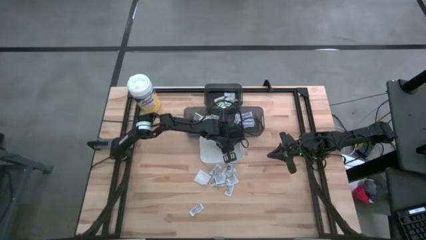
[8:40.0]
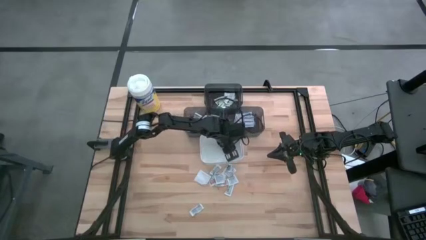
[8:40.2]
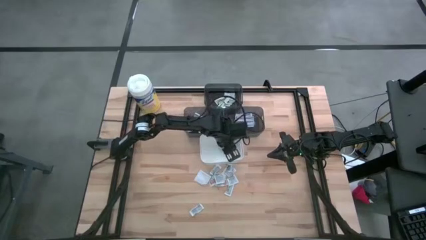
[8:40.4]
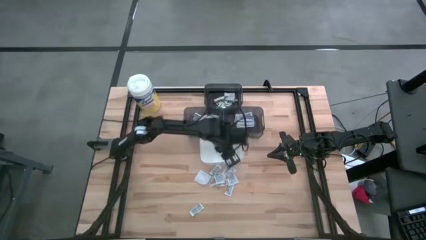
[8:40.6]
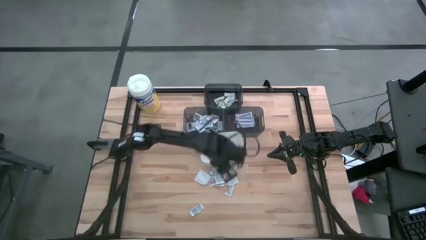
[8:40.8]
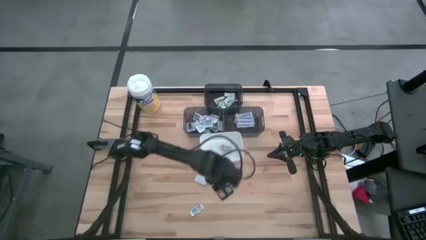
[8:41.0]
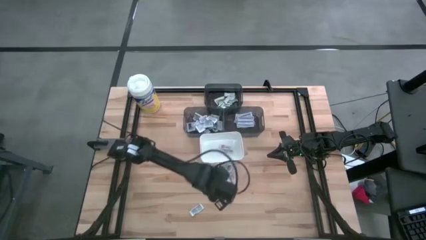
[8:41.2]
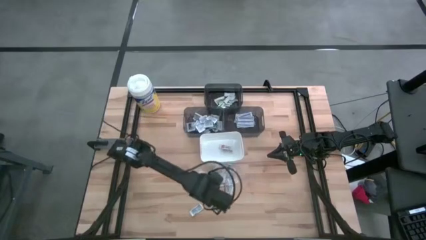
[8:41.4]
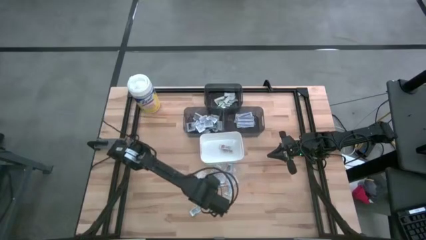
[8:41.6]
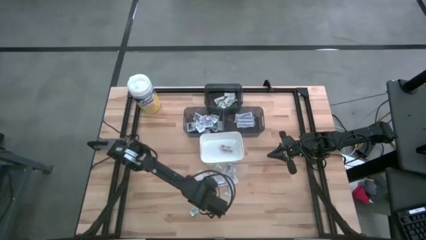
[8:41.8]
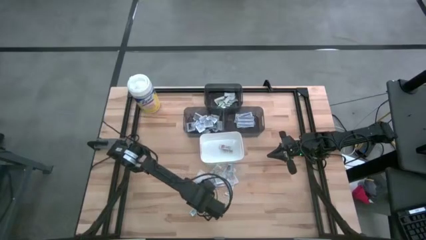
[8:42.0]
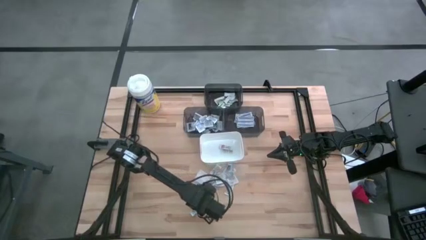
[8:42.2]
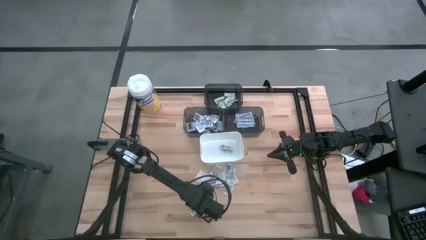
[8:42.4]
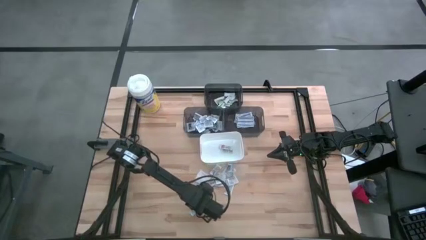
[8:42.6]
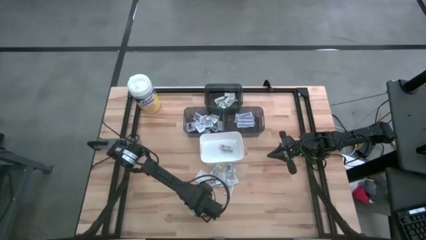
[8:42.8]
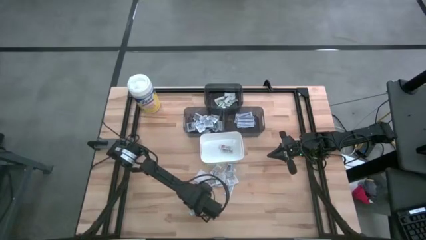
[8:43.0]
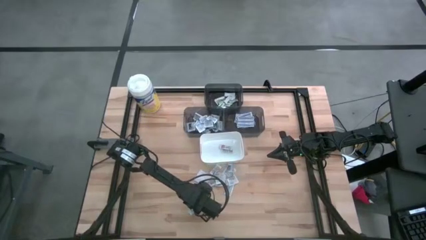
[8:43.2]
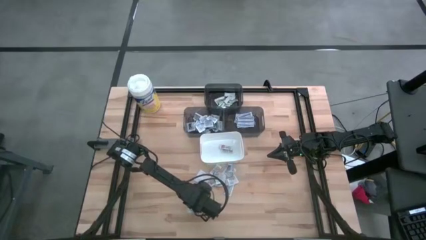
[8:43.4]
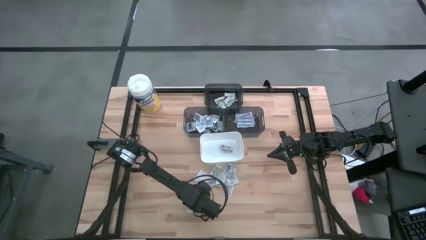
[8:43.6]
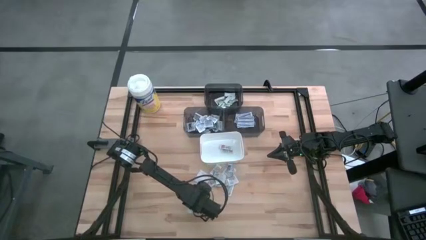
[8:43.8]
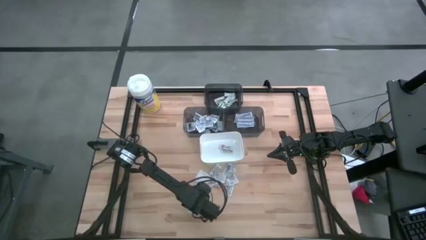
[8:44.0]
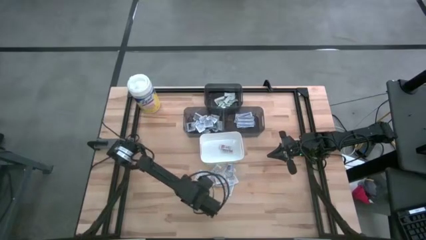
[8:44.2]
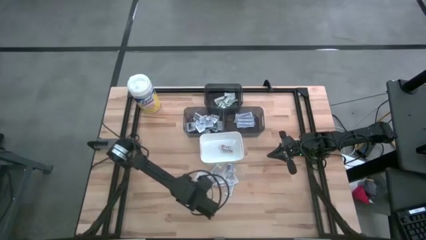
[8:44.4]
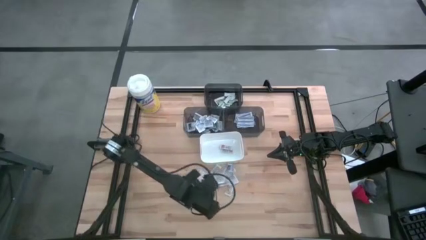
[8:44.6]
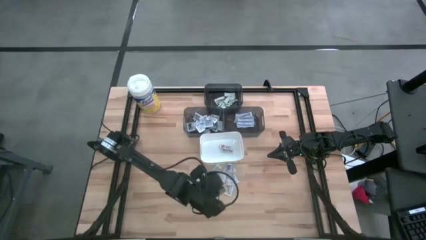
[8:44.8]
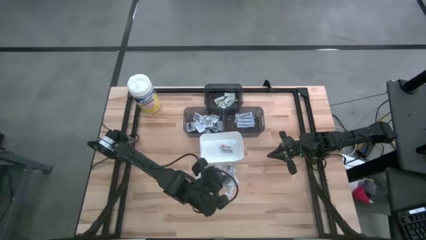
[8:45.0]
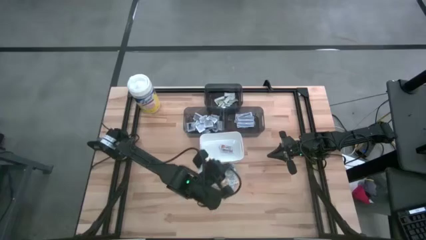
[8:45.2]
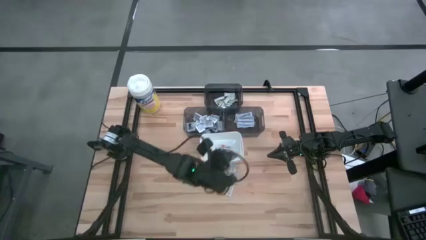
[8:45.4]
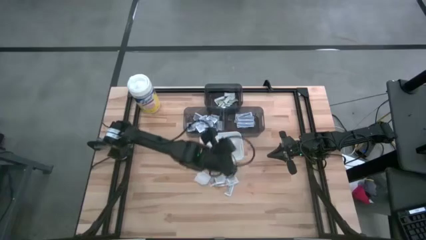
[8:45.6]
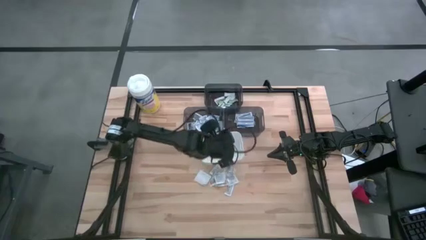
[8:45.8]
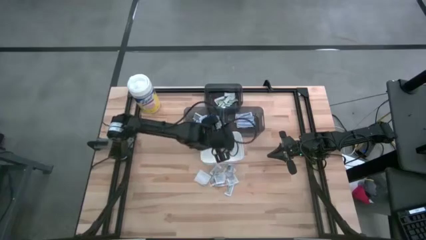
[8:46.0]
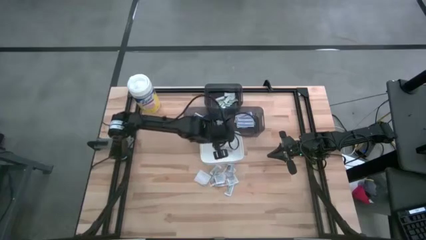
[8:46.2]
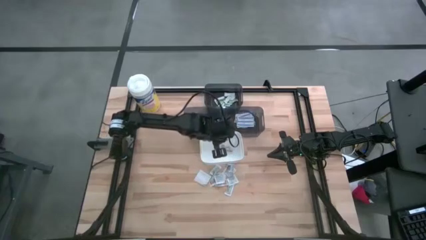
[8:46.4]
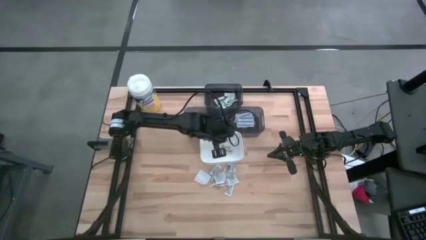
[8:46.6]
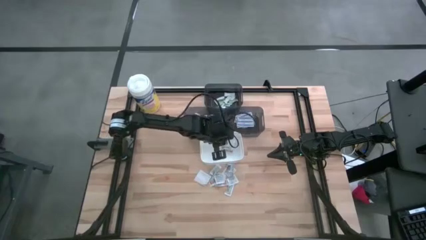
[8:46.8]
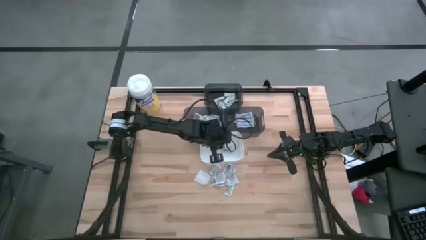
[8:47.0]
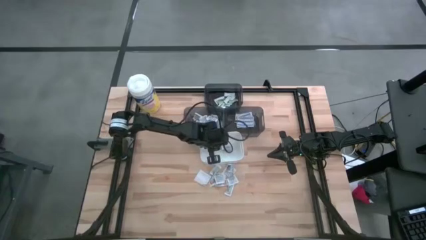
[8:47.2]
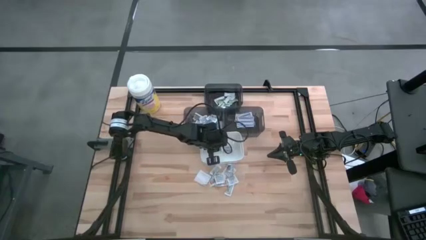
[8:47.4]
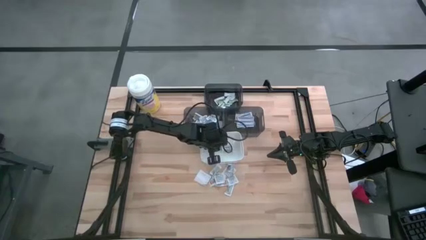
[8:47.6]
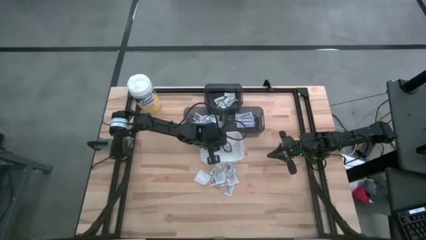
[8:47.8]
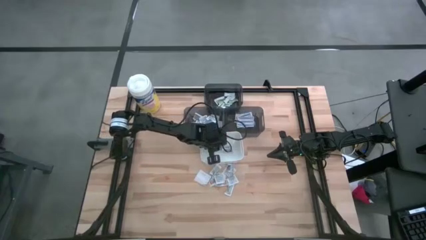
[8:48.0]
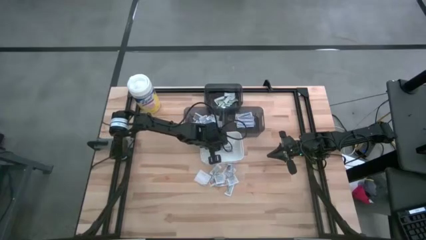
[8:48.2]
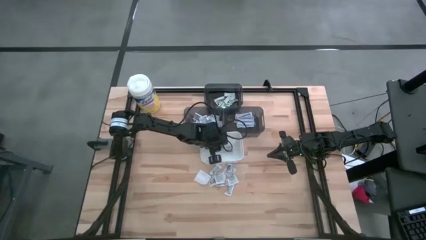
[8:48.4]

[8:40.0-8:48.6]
Task: Pick & Place First Aid Supplies
Put the ointment pack into the white bin

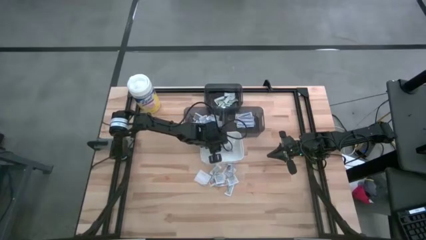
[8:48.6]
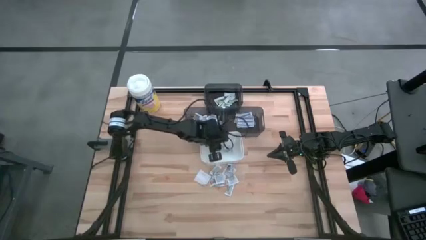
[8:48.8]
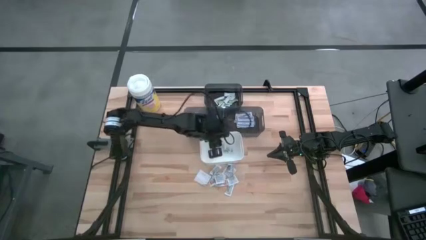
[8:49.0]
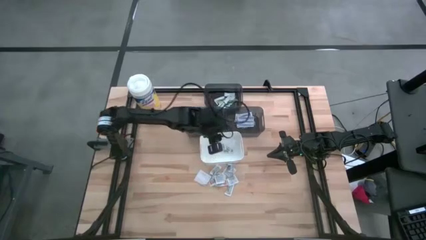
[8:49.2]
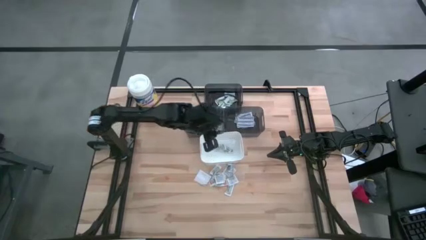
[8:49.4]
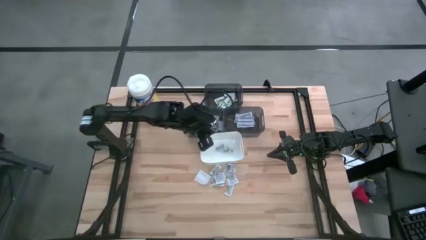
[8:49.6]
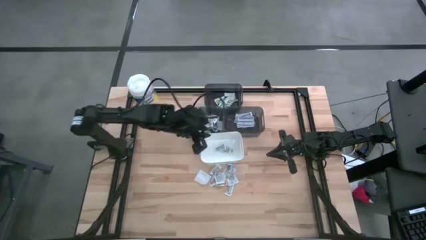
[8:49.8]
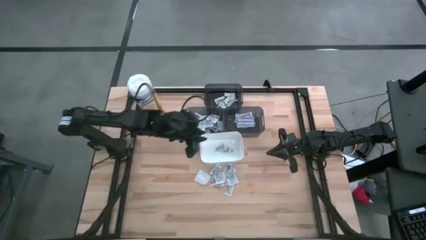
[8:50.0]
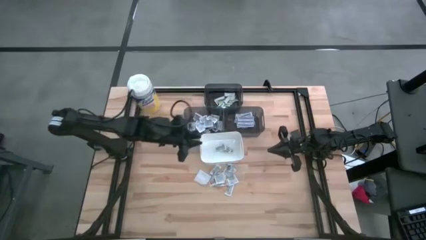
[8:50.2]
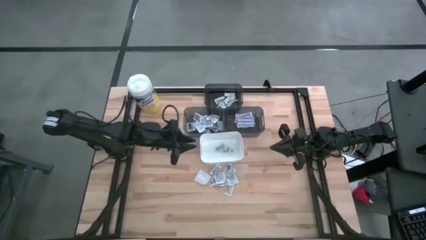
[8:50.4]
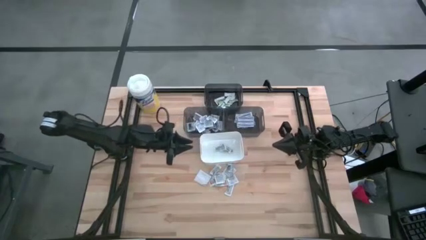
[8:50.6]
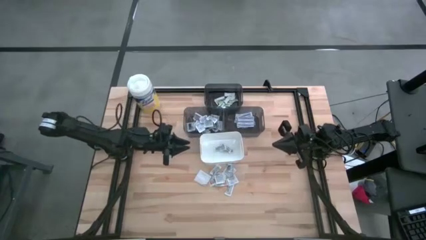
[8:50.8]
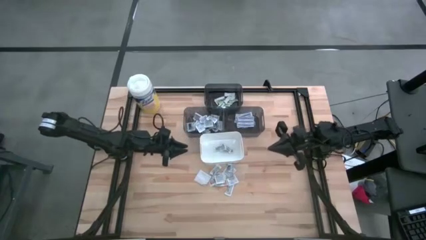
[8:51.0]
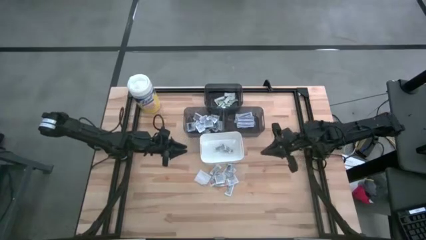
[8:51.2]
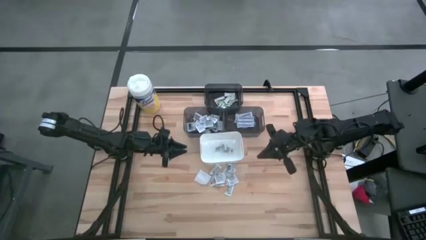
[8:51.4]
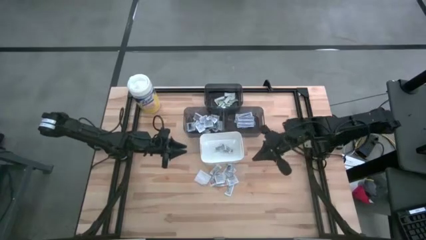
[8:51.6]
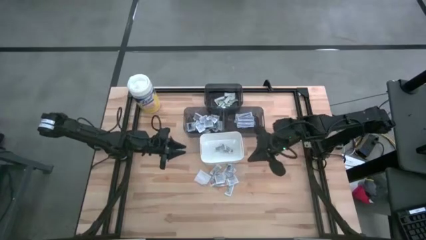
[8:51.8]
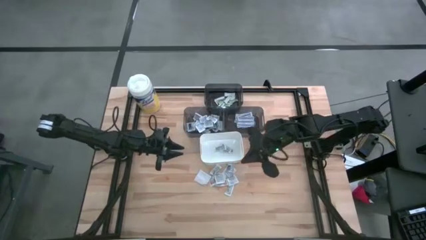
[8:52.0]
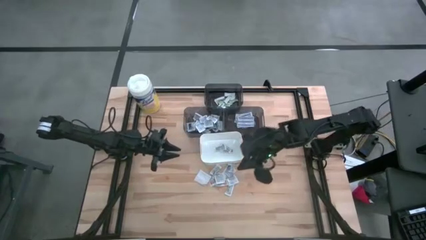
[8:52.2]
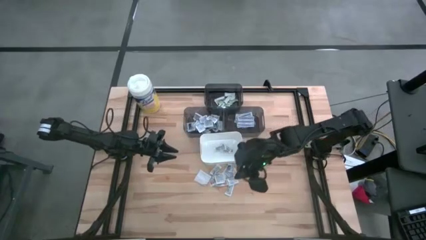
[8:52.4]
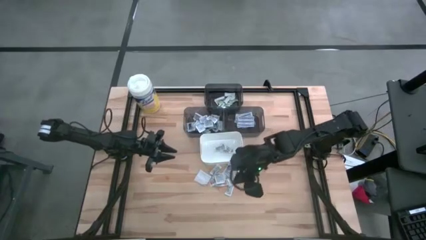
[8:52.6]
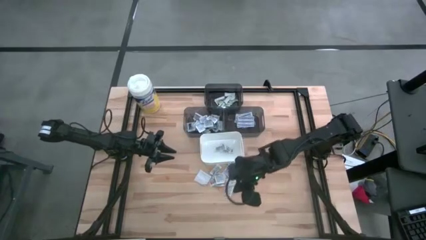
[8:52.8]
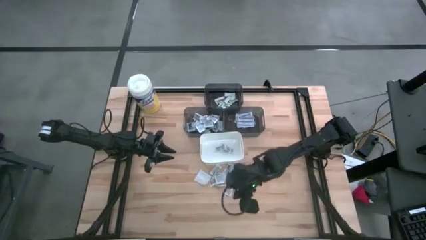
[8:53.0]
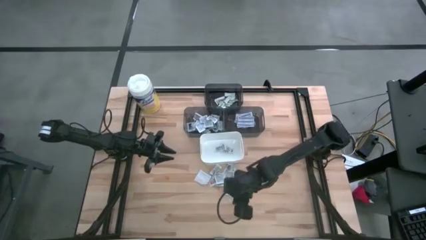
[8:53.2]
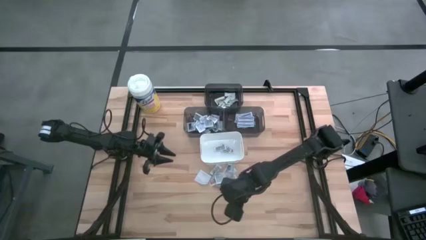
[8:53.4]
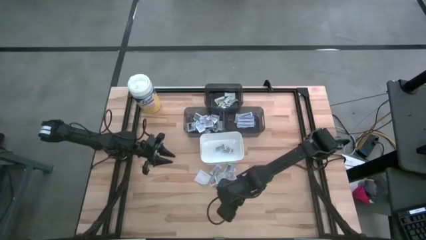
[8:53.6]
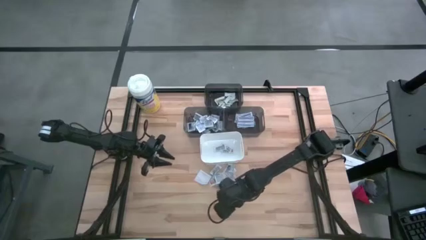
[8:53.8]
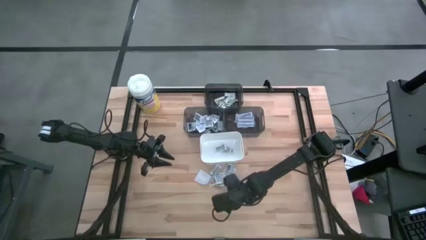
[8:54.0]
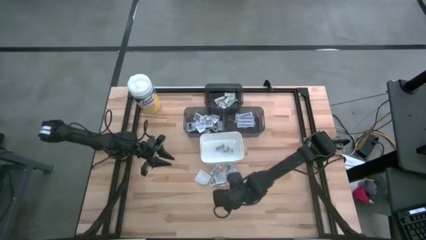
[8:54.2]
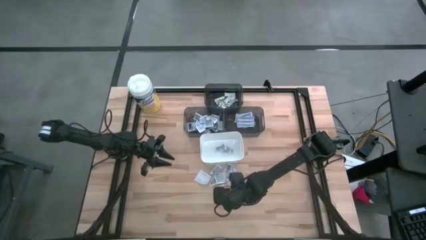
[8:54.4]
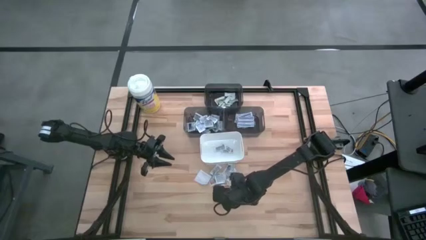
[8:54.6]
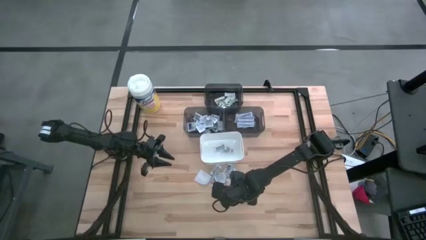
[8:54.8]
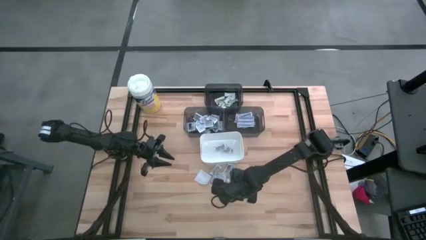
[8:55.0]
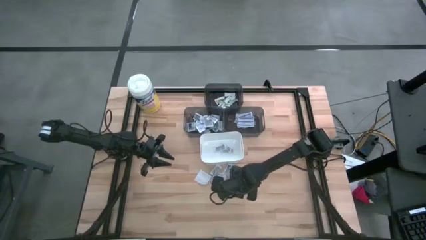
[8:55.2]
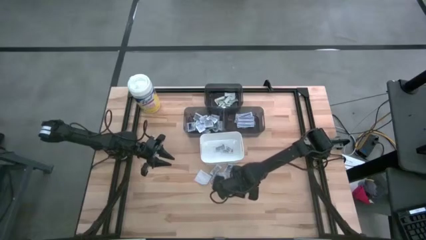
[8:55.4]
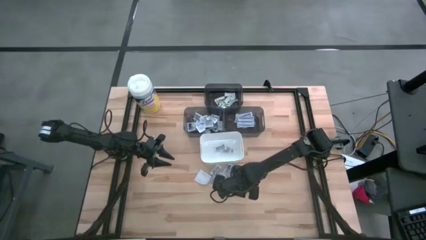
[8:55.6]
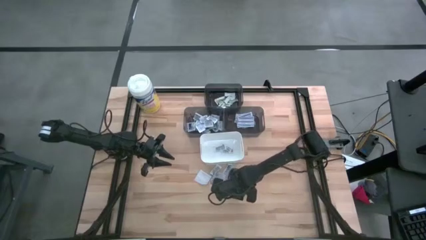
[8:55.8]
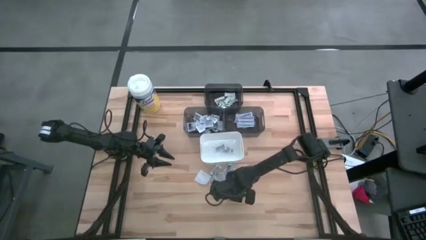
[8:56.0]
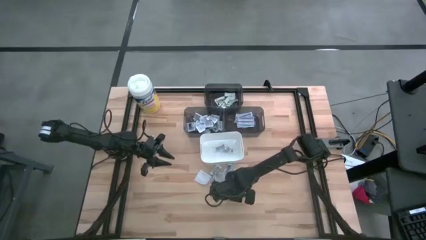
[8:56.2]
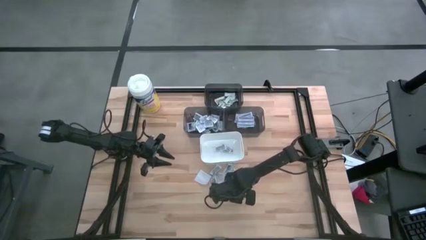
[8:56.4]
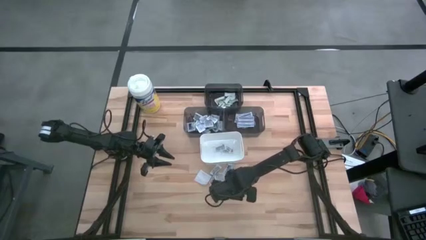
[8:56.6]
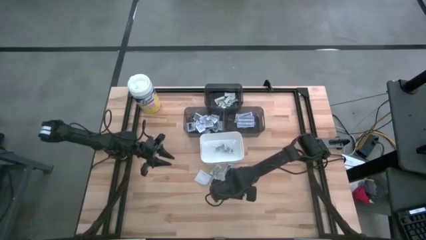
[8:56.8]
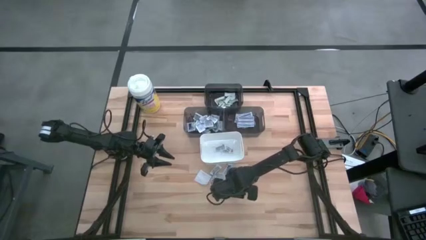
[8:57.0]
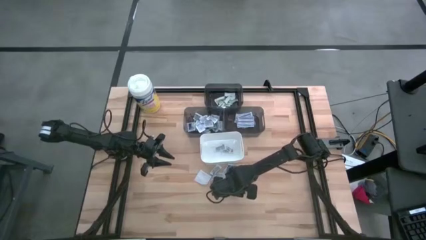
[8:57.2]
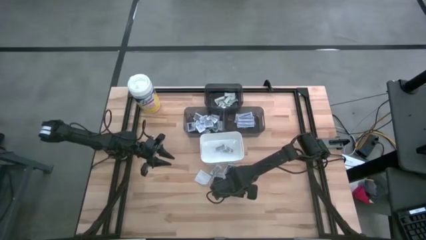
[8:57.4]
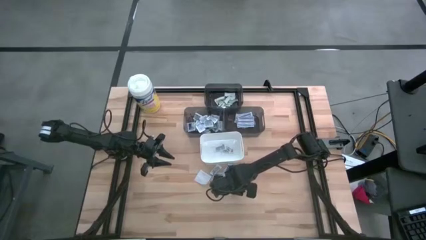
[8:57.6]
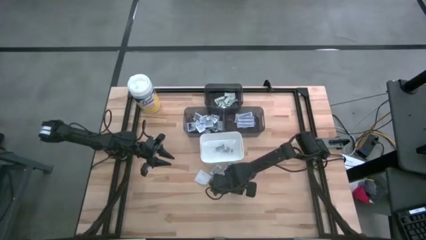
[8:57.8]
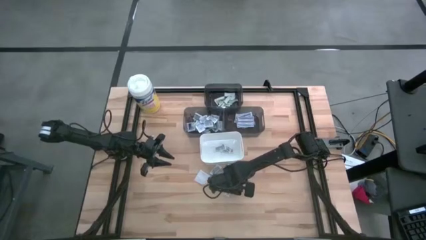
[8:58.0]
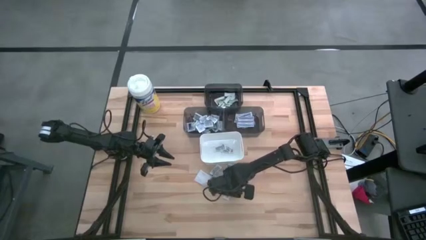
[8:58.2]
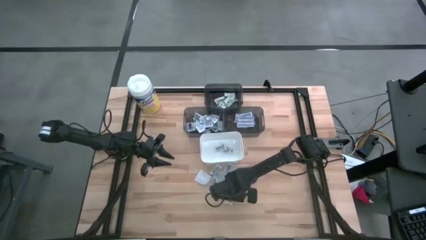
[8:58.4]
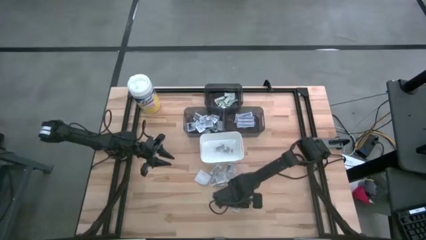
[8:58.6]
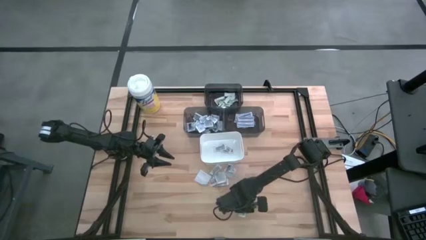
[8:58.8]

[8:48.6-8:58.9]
Put the ointment pack into the white bin
